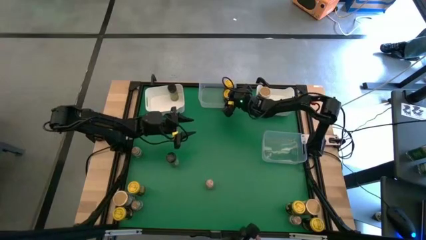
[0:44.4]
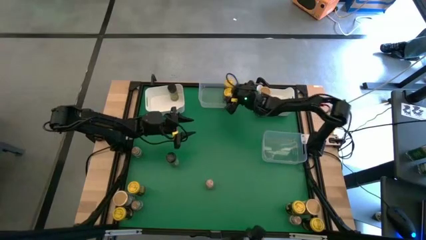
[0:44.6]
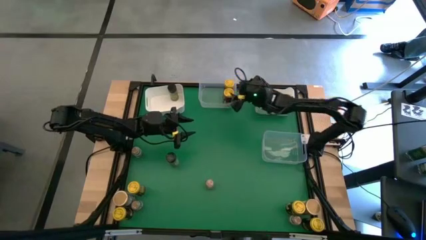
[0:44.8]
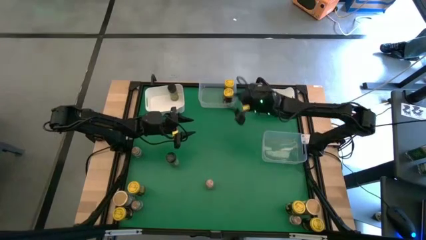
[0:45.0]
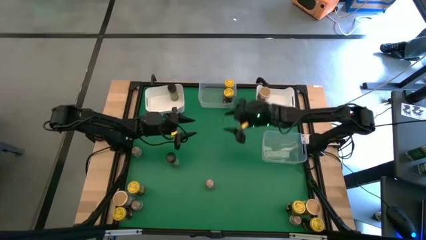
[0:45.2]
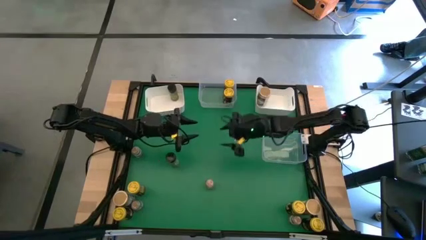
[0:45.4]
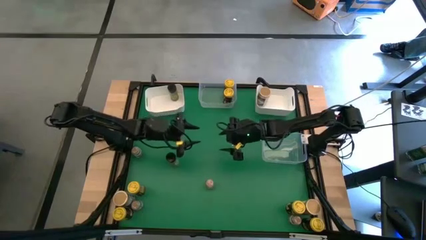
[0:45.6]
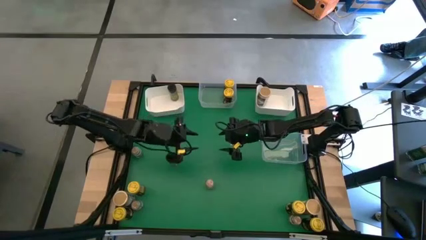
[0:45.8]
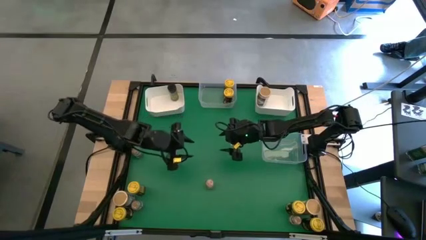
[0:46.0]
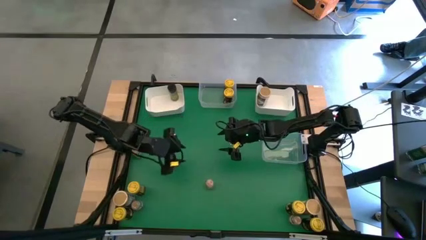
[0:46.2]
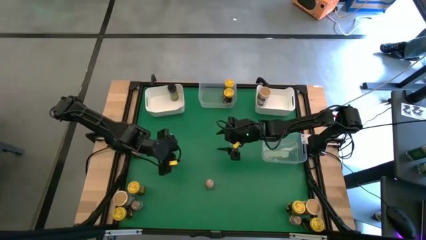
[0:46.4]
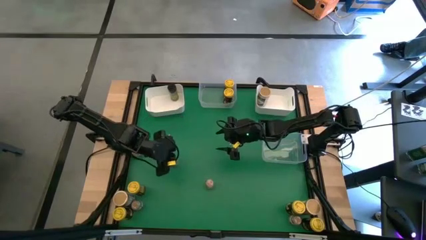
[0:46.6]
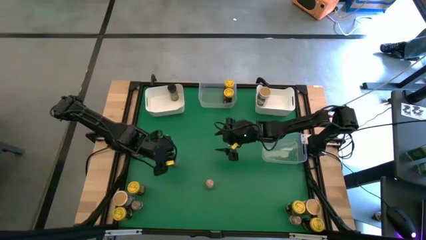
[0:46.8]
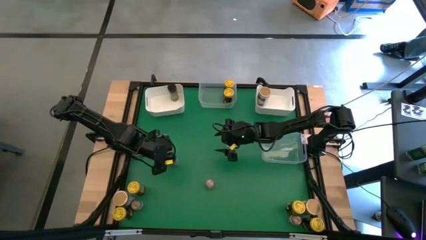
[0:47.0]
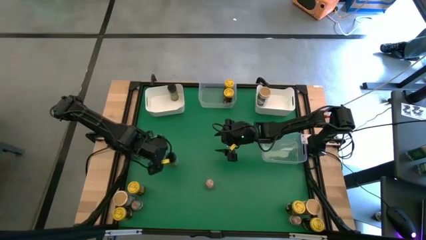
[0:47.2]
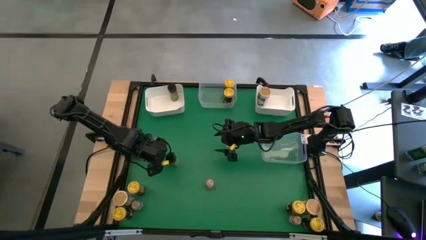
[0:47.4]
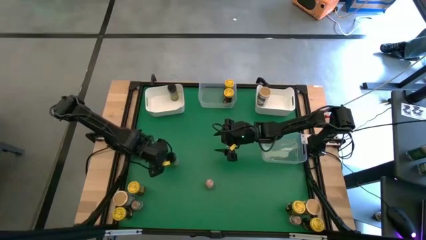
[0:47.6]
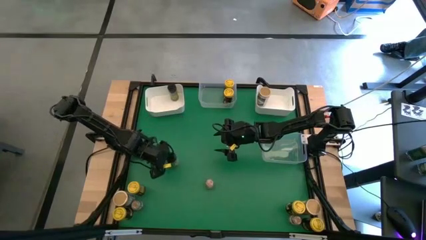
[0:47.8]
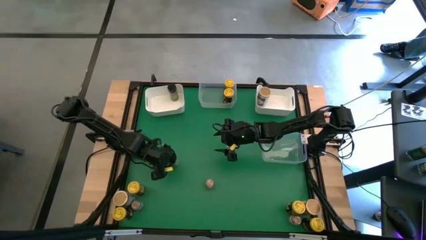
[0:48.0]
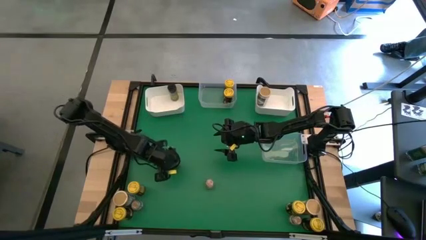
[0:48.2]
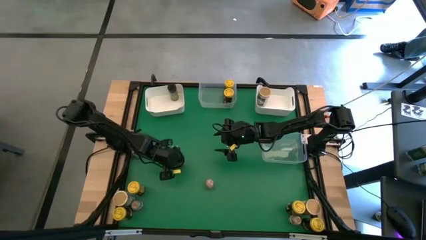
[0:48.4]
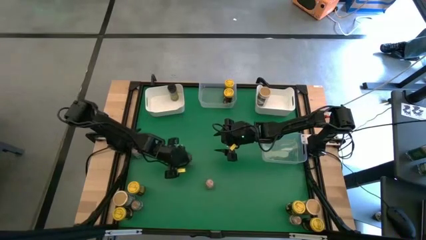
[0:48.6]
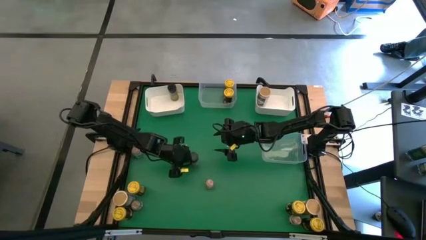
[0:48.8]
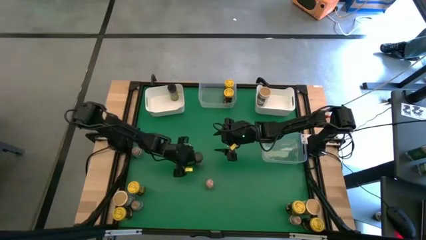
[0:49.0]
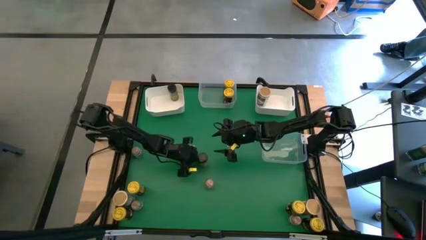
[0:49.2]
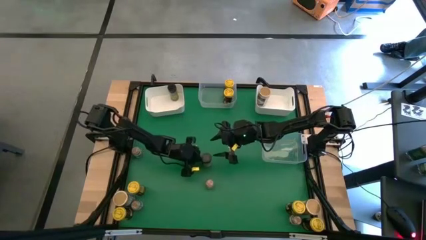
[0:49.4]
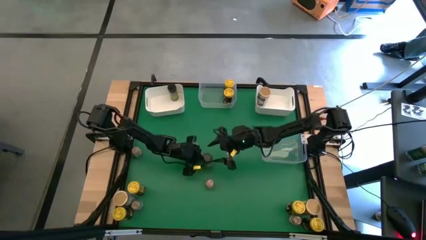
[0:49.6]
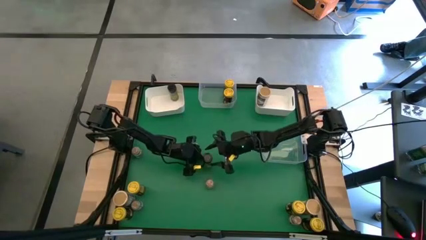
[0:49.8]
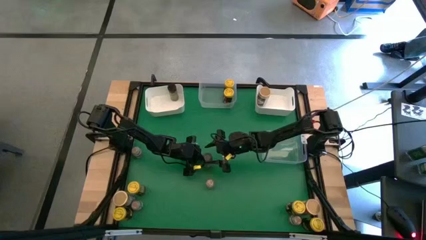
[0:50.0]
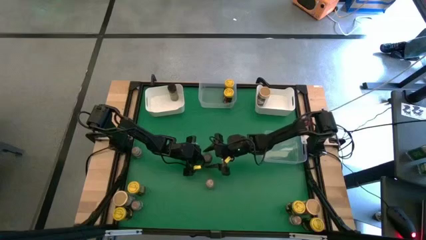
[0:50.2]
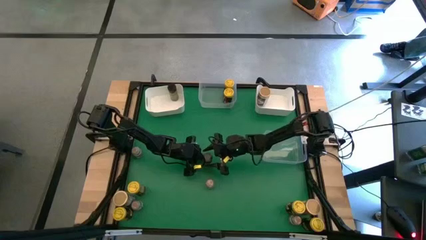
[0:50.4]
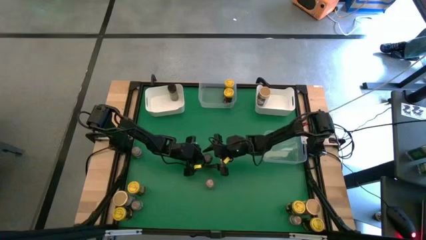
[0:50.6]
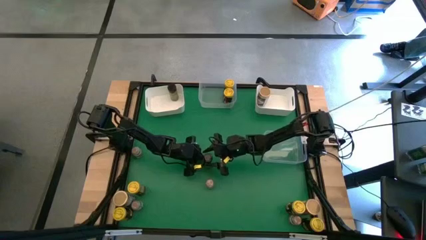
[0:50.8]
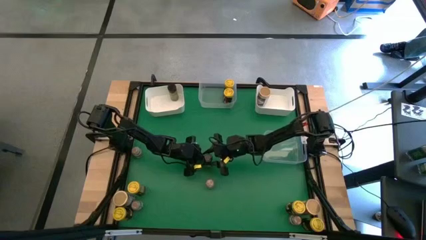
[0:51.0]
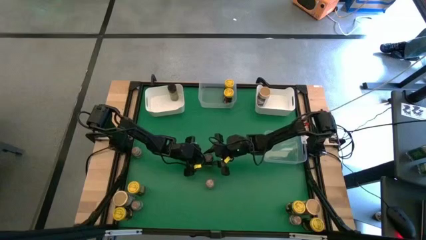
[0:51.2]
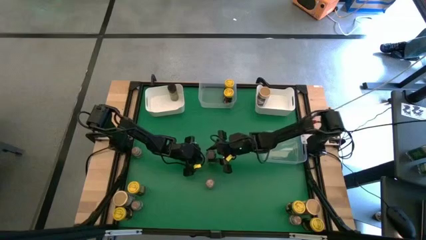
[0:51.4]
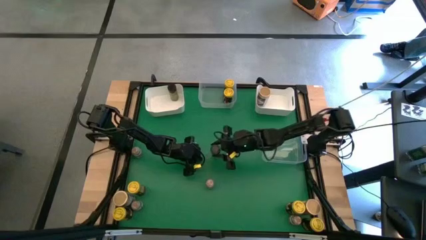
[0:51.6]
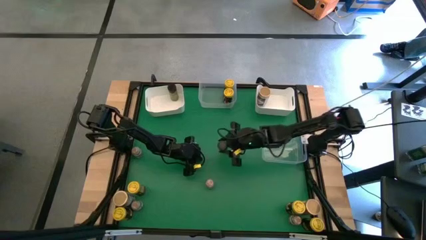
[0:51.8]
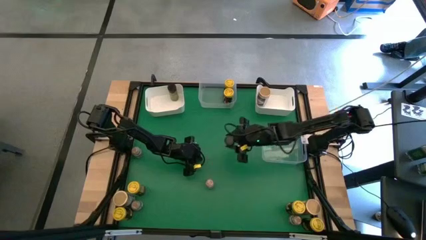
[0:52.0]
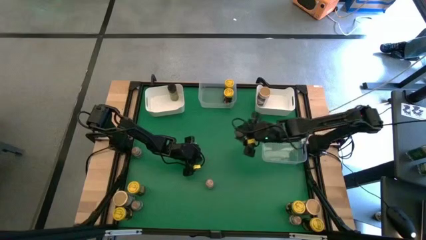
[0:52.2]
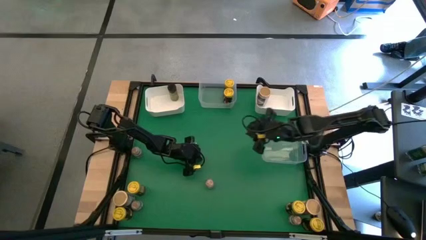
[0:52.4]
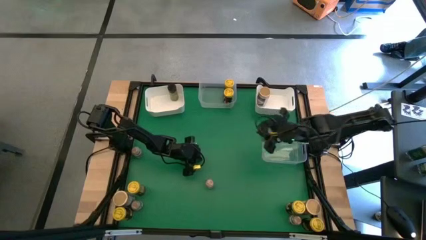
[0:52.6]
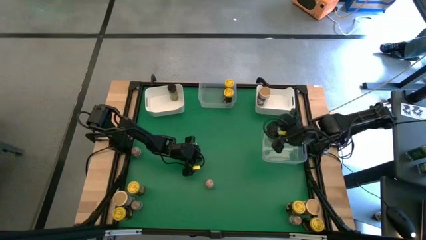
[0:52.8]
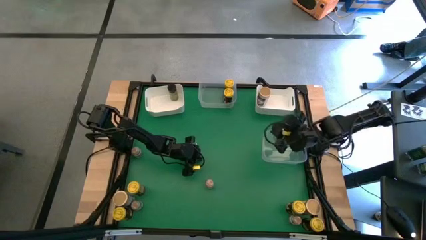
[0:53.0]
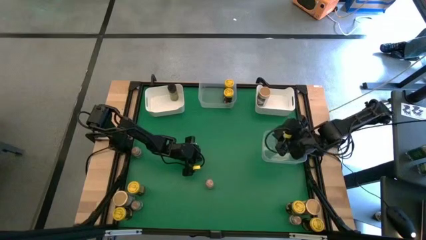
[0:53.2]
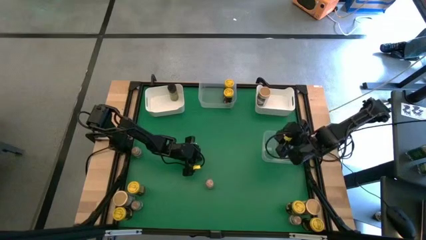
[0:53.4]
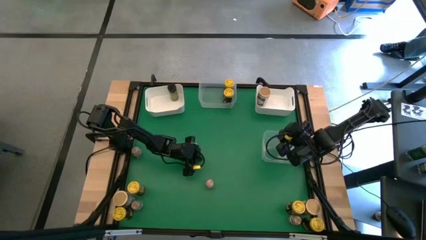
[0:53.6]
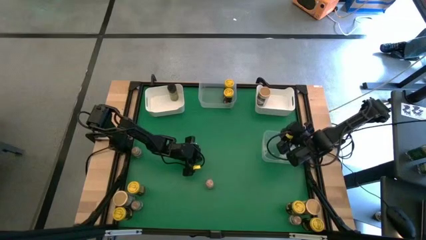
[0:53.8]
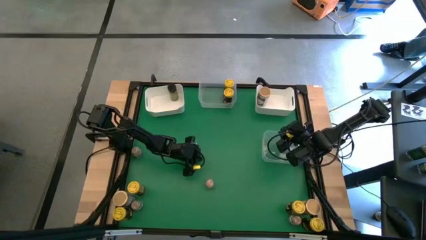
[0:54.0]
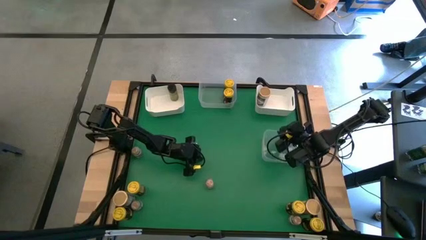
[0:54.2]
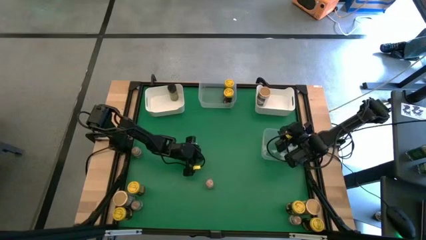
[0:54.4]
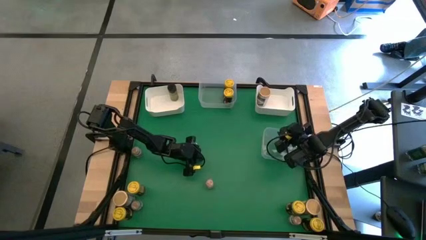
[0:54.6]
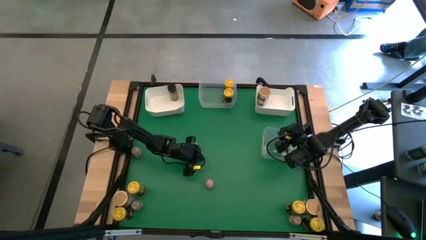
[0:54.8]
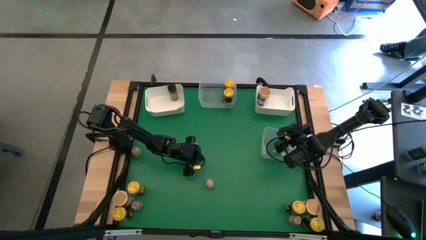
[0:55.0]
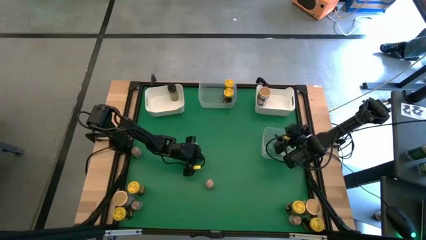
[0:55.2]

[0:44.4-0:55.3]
Task: Sort spices by type
Put the black seasoning bottle into the left white bin

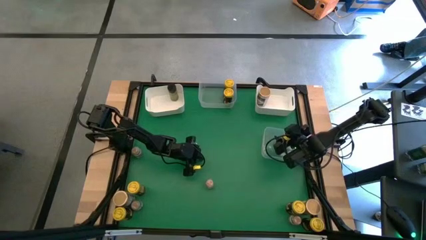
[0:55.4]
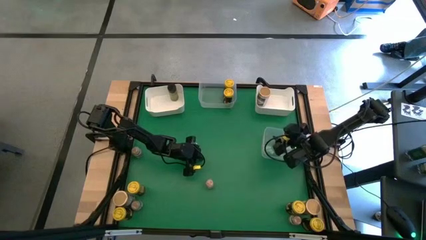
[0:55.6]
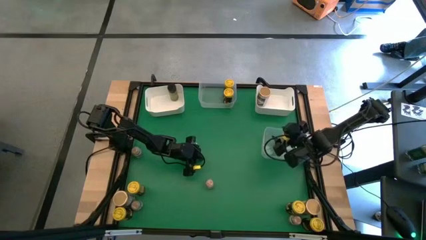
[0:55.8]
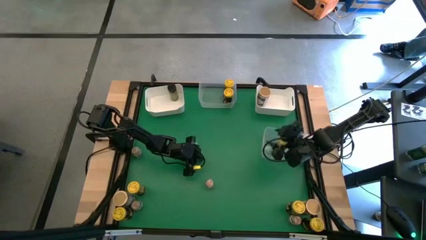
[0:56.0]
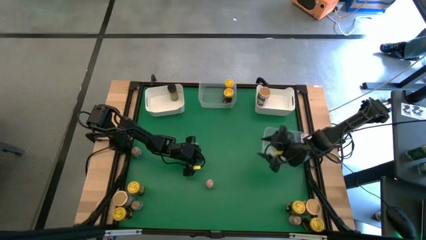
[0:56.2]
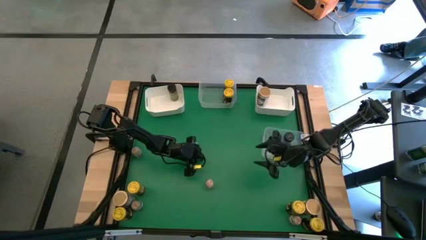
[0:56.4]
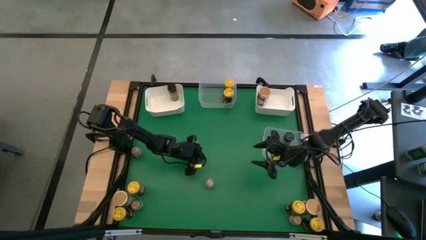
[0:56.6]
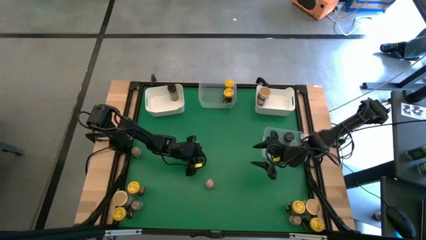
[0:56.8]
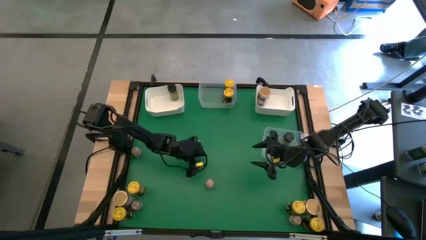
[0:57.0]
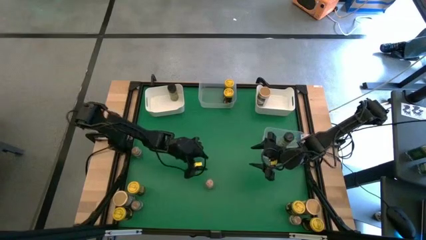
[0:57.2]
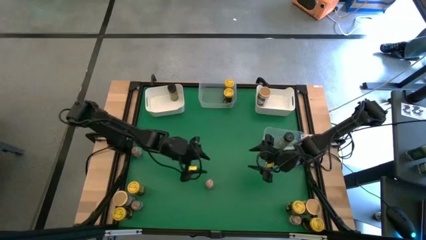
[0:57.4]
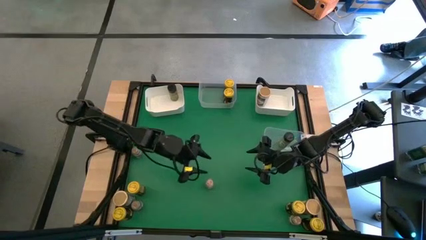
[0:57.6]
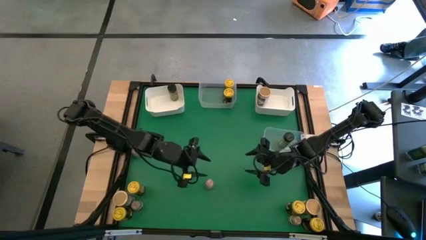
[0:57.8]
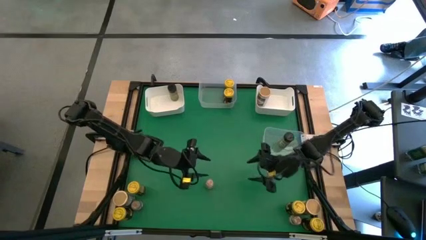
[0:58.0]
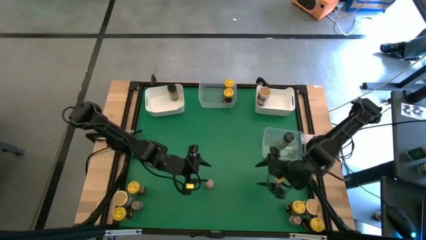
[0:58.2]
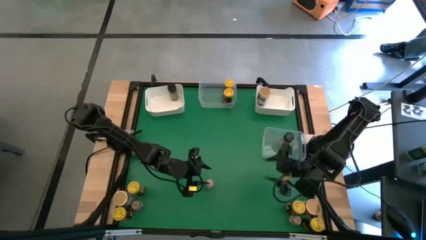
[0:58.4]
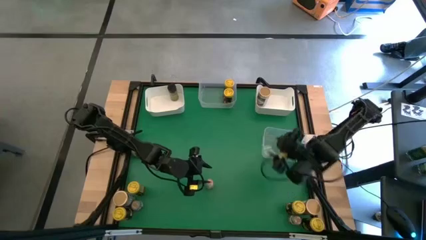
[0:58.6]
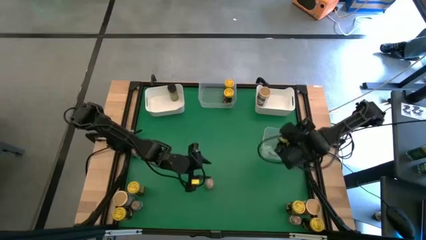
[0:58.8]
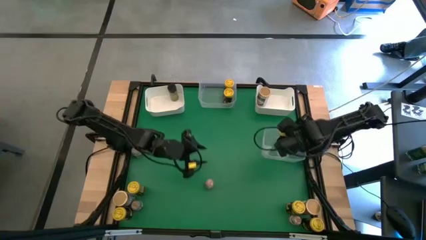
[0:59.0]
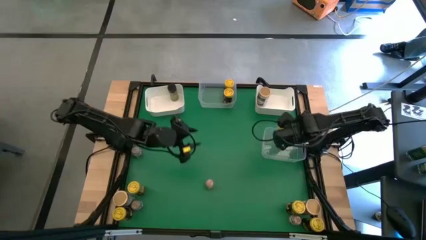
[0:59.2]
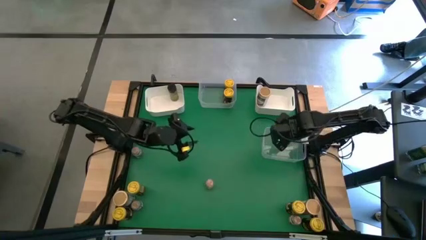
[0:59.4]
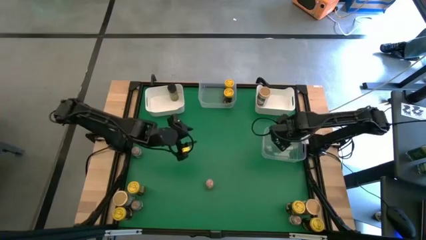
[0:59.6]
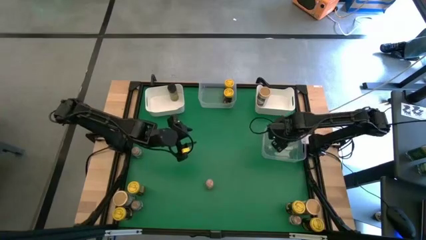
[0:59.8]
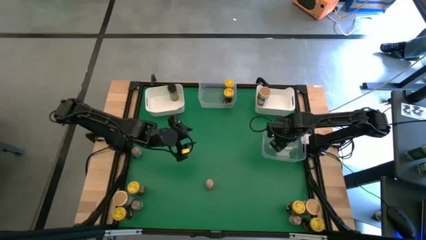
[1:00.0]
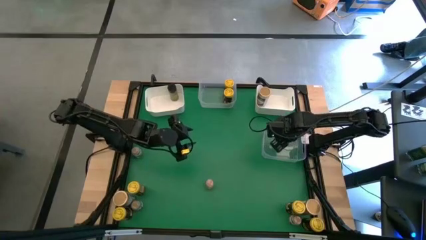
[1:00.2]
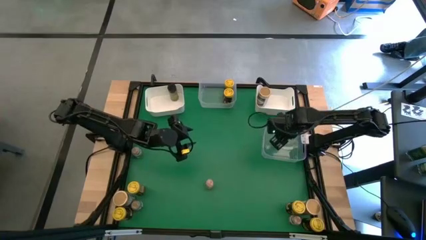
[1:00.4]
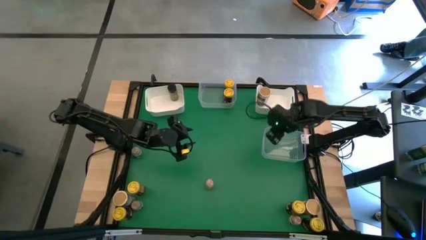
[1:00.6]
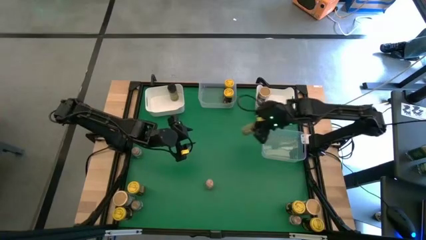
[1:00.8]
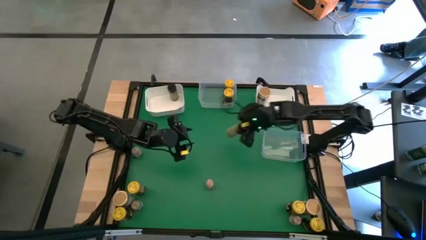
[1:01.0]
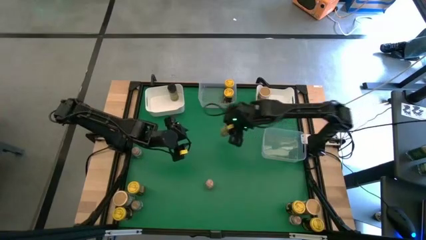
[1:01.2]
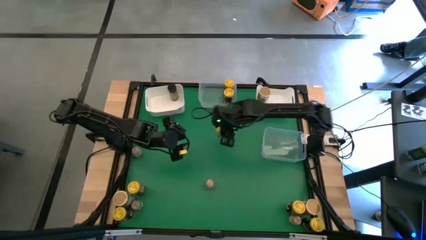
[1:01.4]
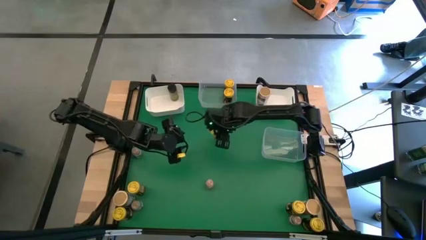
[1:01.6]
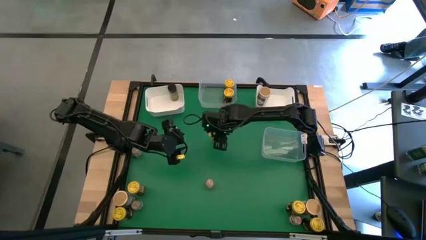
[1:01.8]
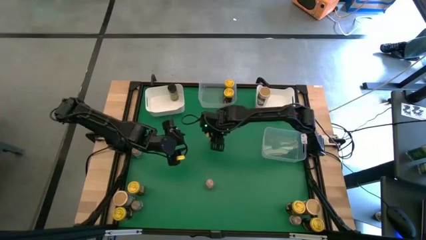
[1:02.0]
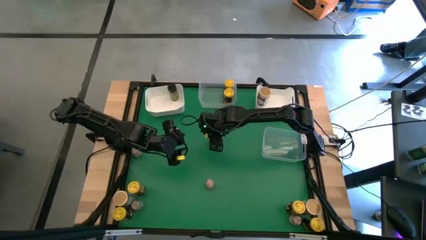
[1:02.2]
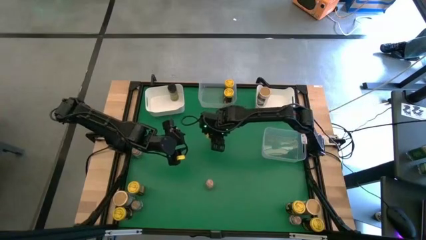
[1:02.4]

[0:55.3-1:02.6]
Remove the black seasoning bottle from the bottom transparent bin
